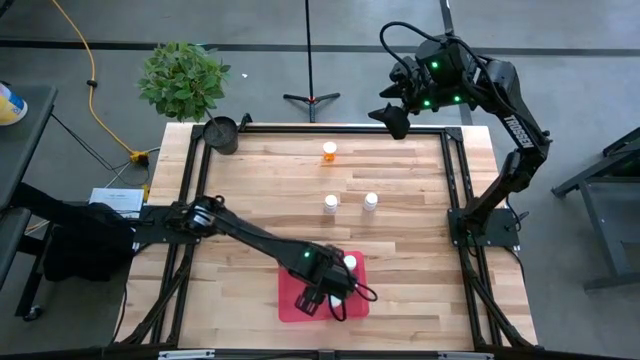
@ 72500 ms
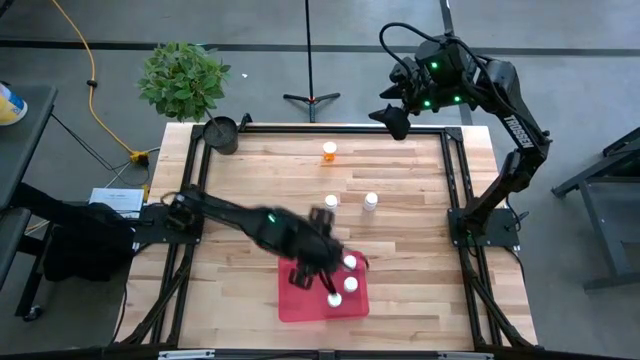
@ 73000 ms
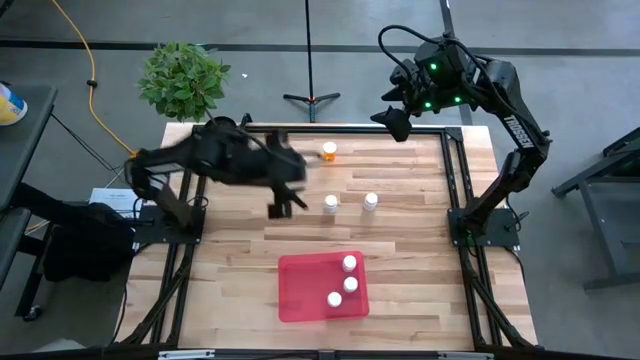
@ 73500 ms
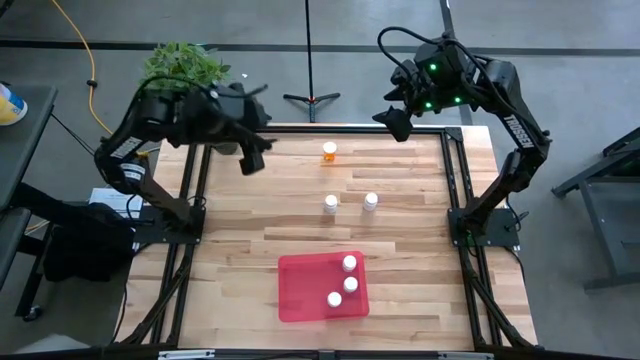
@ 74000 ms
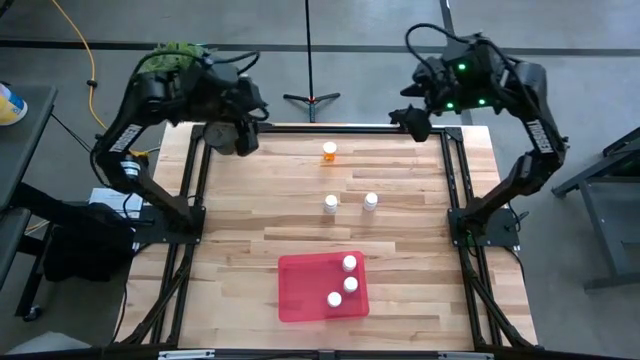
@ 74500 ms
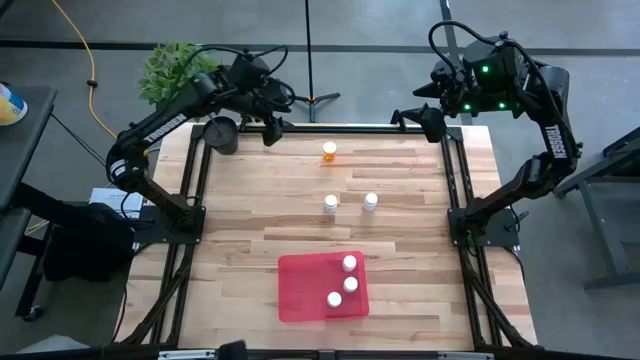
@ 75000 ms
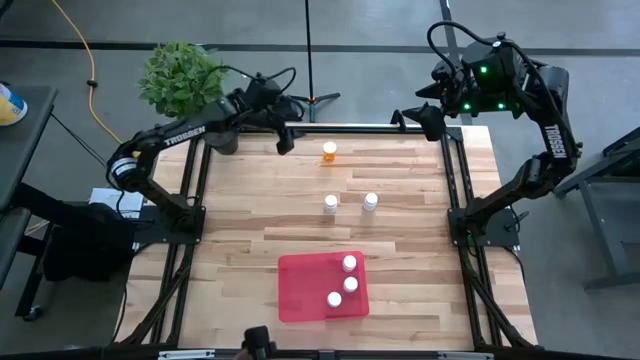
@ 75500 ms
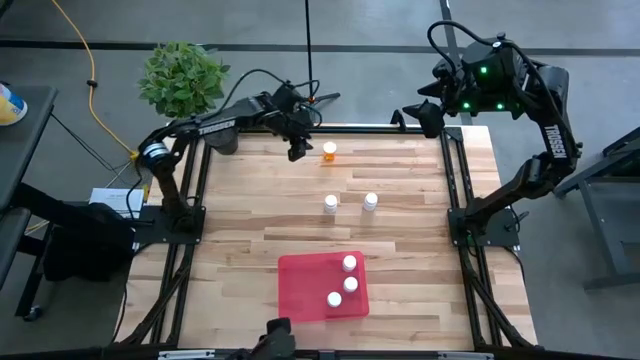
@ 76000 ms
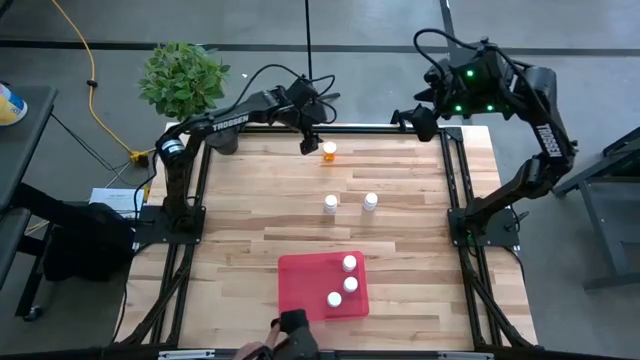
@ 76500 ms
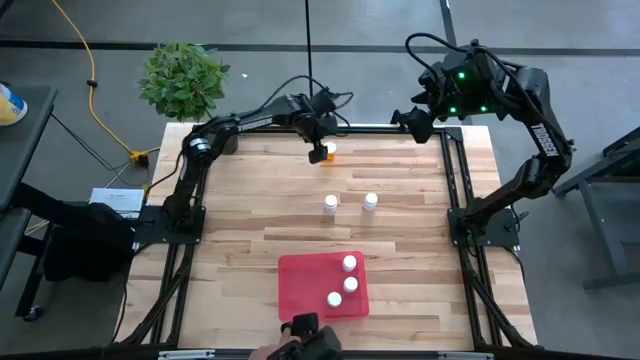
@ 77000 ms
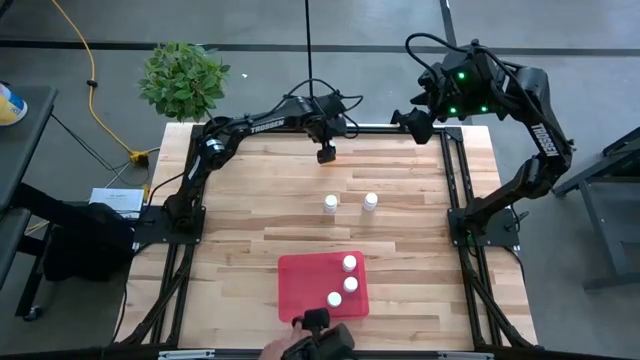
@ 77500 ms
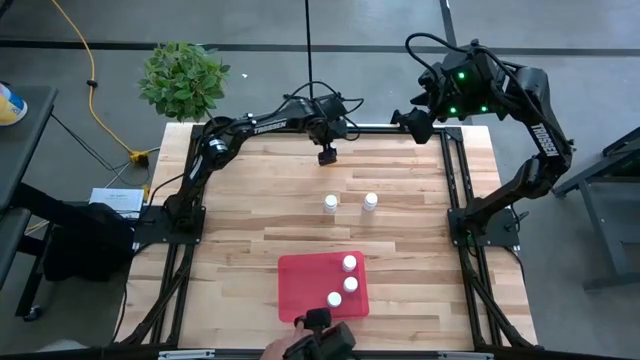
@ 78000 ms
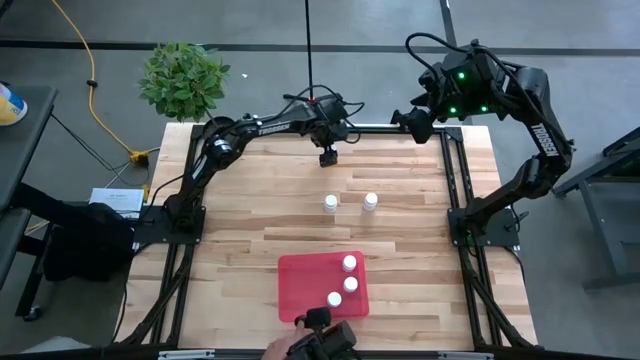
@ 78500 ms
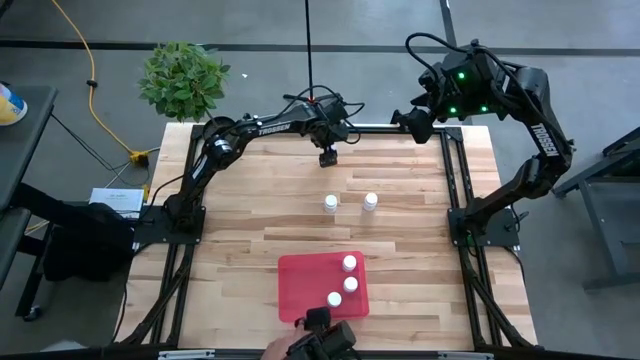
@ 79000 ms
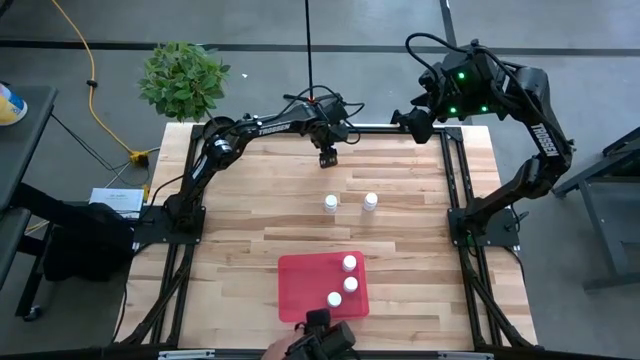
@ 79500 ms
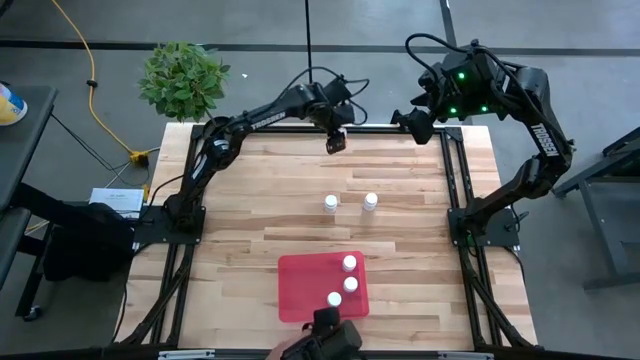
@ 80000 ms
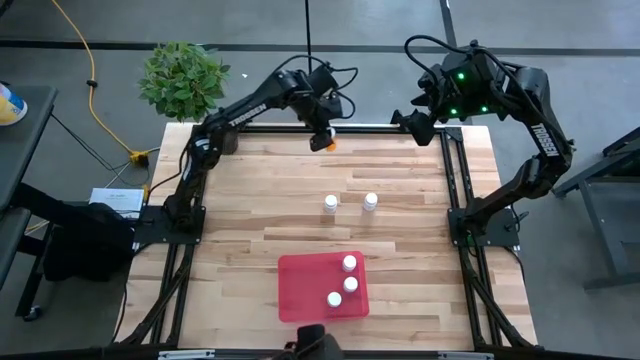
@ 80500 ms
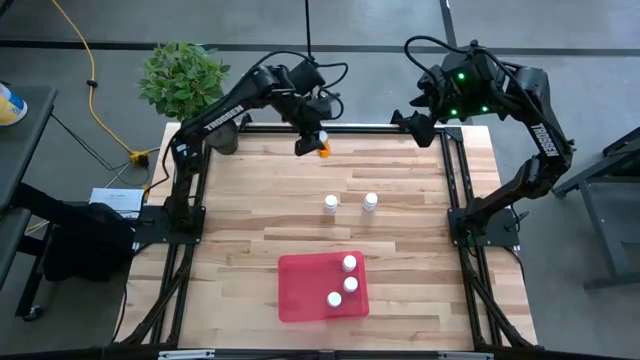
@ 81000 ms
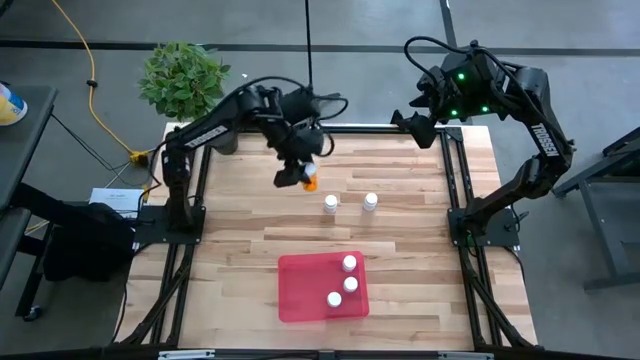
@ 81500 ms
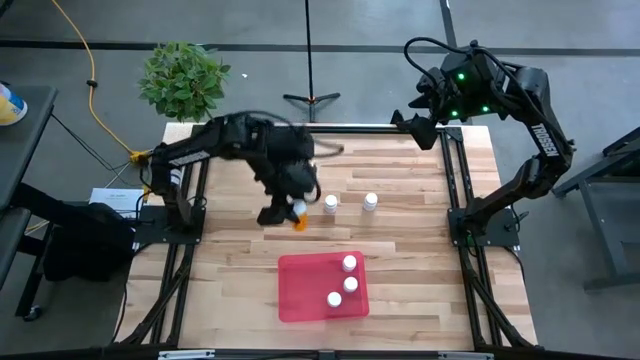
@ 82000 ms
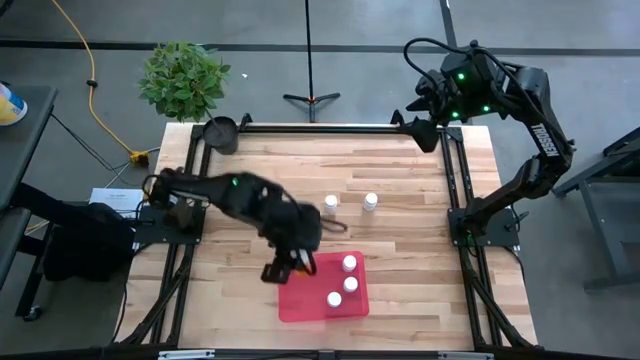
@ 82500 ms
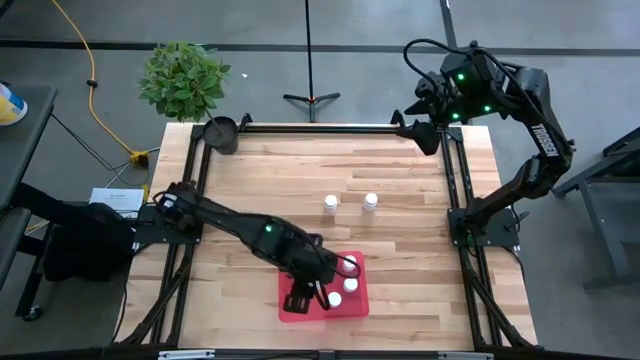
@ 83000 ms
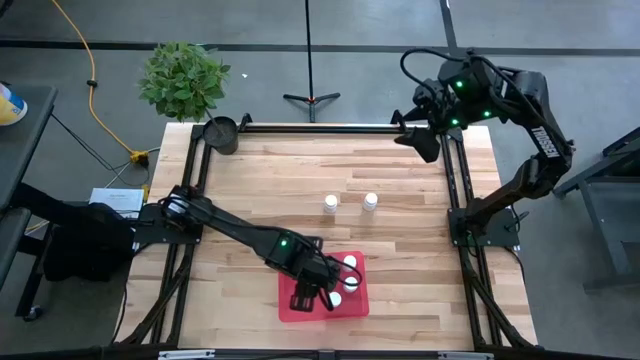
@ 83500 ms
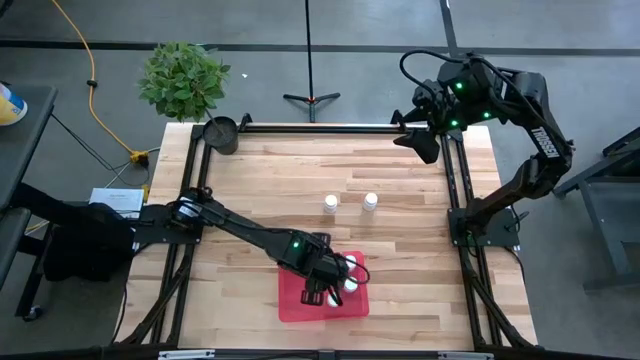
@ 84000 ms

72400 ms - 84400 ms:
Task: Pick and place pill bottles into a basket
Put the orange medicine bottle into the red container

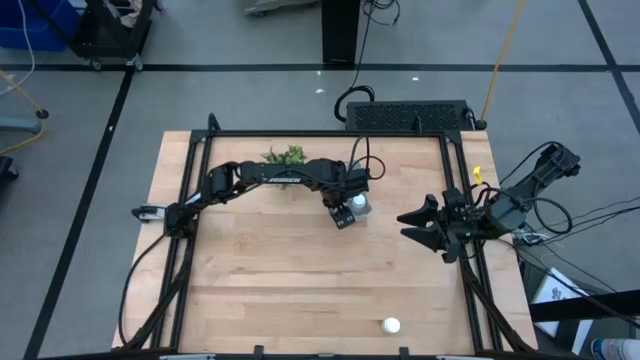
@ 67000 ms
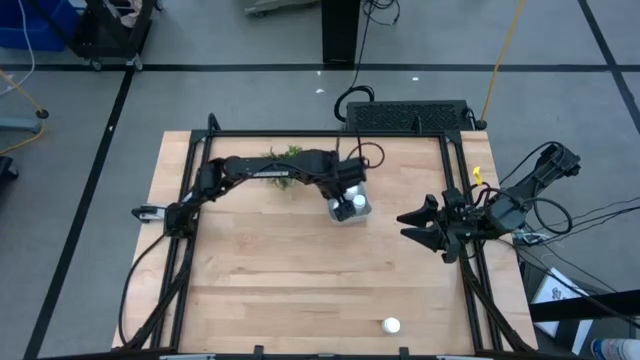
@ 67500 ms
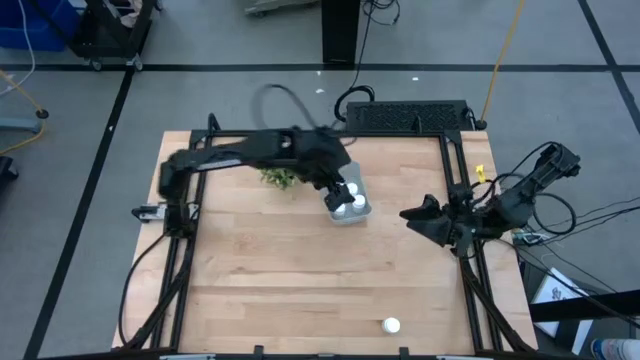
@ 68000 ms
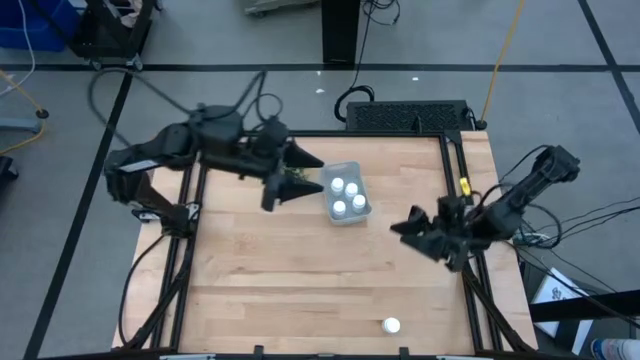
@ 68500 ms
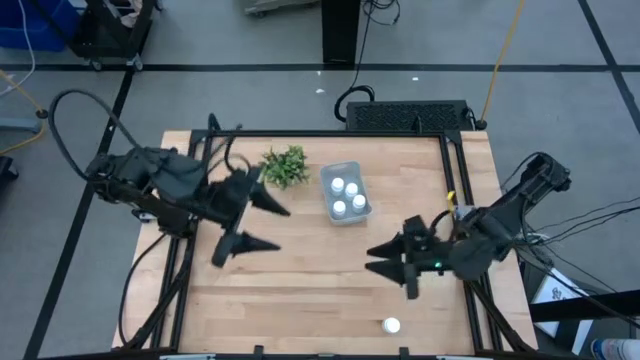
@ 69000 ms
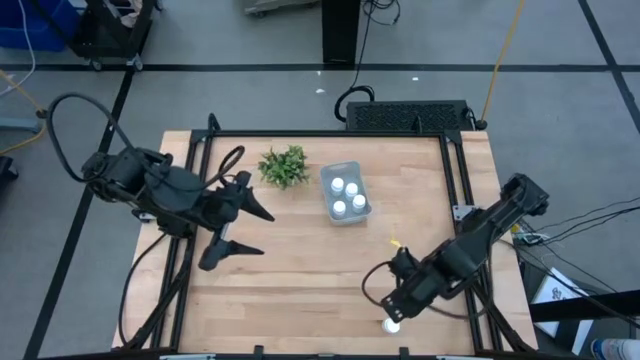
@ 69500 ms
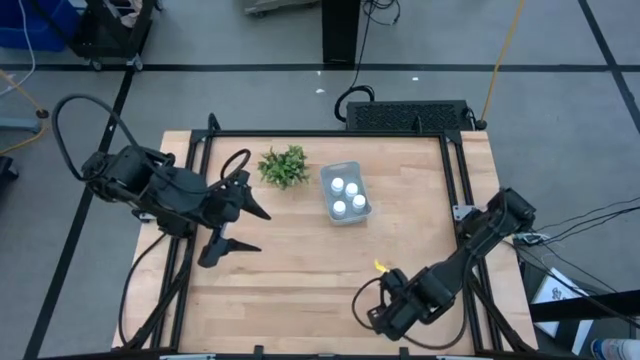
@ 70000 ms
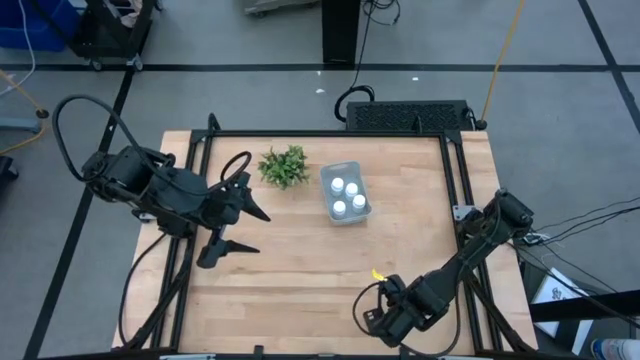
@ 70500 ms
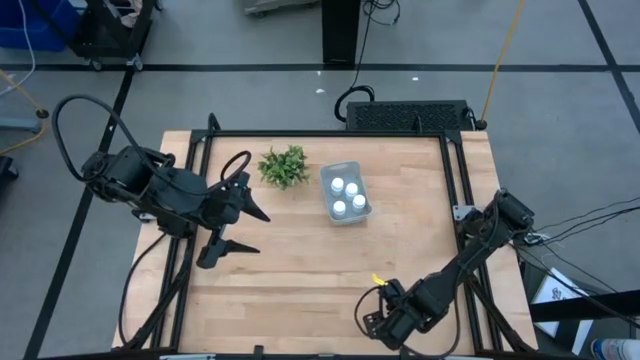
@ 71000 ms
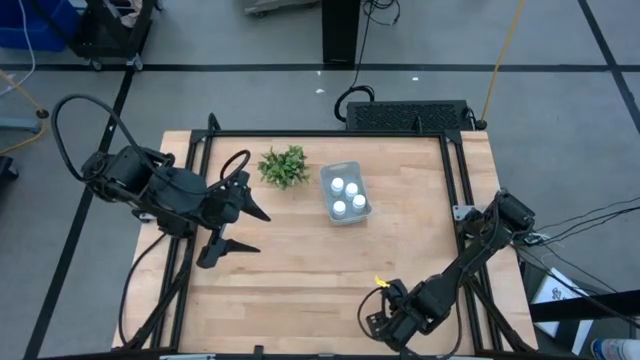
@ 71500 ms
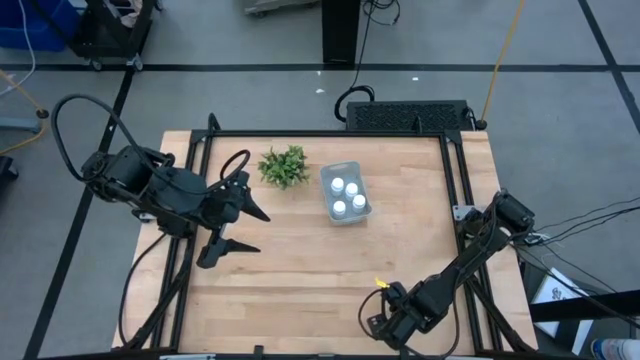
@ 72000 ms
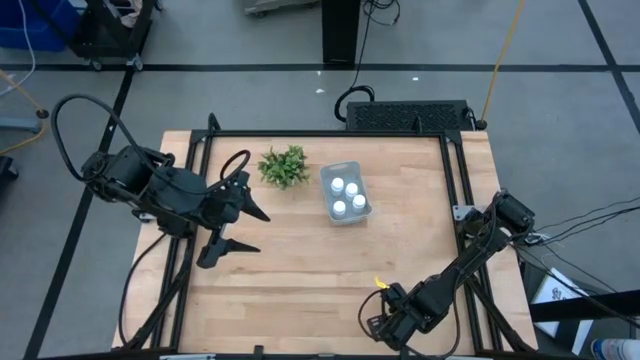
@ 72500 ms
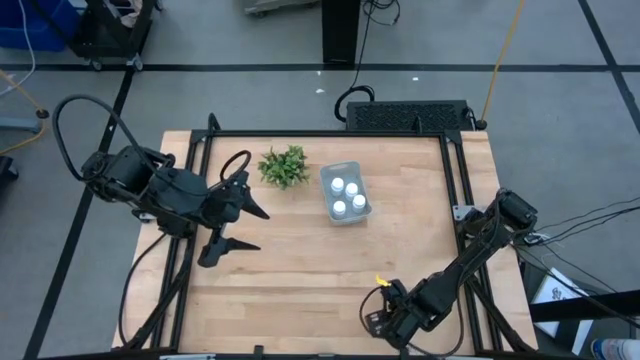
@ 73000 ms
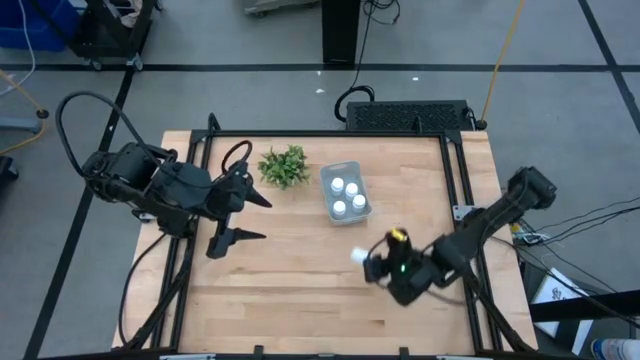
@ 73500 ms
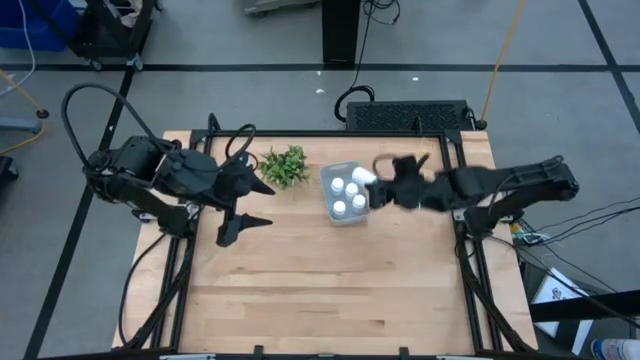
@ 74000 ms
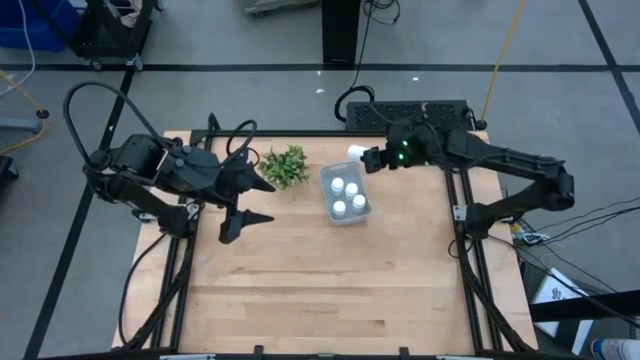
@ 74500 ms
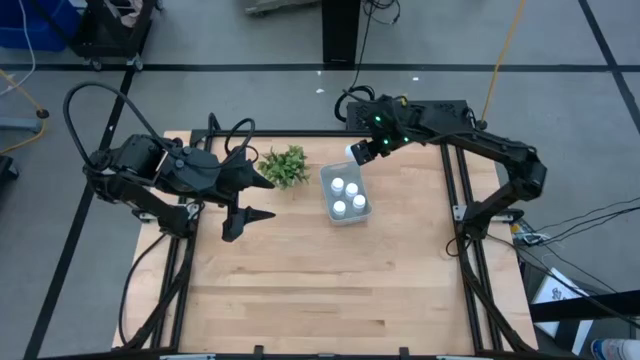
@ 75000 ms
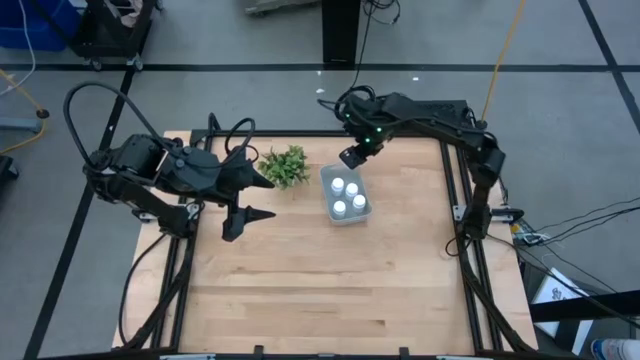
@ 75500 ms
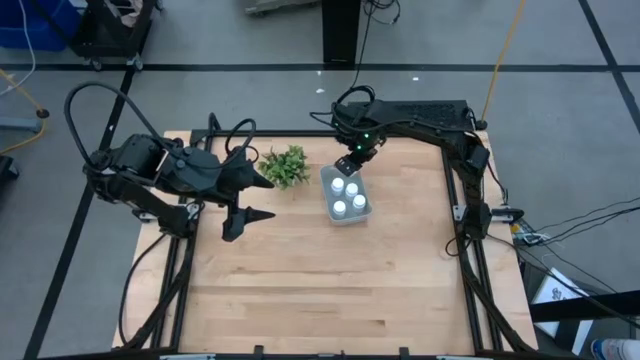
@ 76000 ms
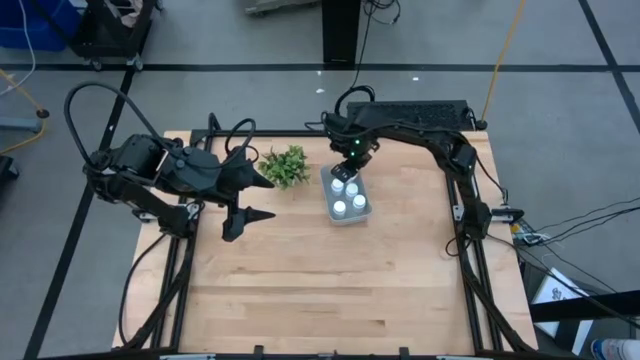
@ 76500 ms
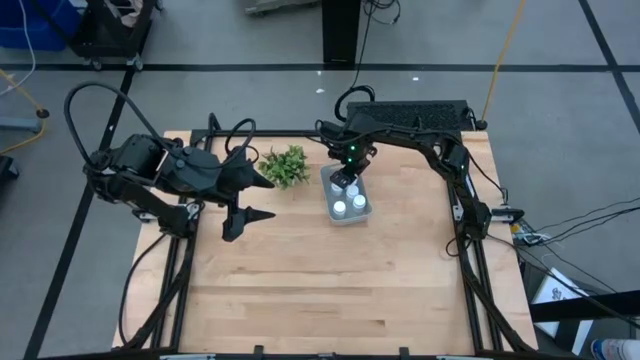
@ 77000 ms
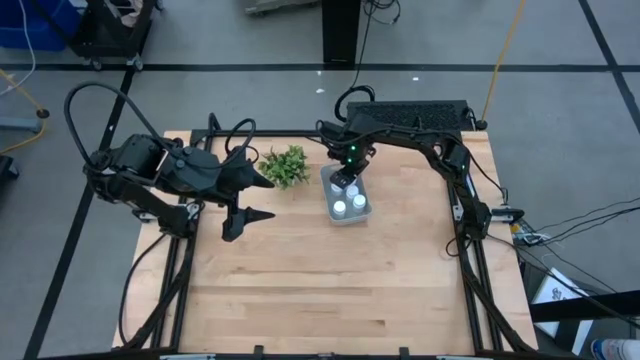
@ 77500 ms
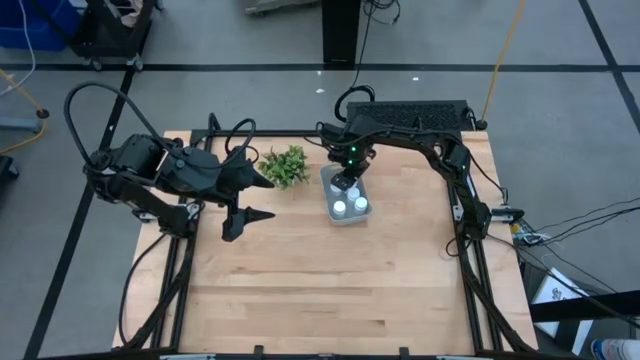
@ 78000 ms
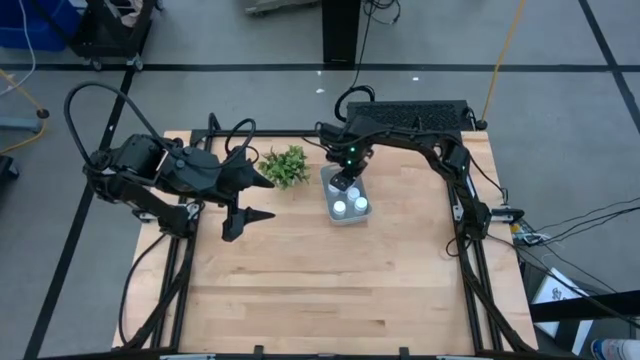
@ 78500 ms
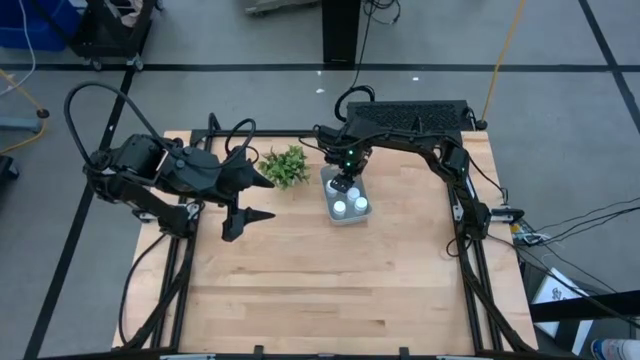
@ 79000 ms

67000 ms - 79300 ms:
Task: Pick and place pill bottles into a basket
Put the white pill bottle into the gray bin
